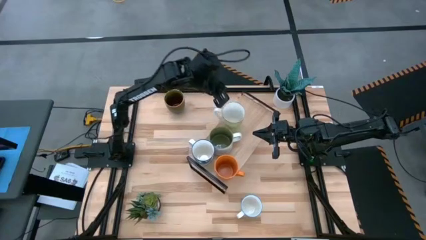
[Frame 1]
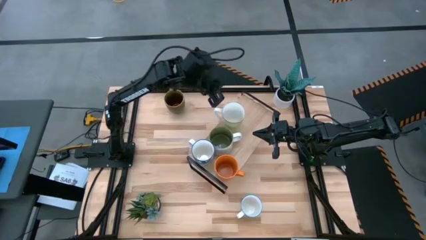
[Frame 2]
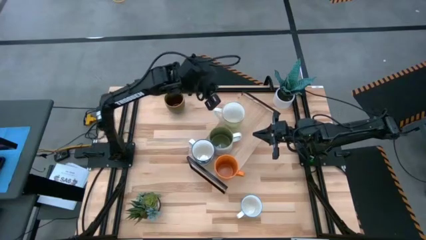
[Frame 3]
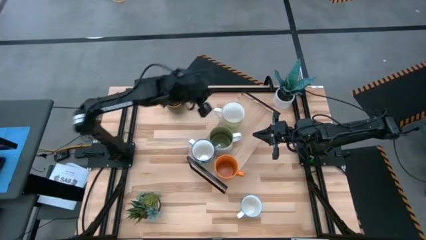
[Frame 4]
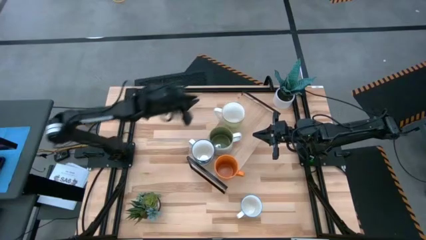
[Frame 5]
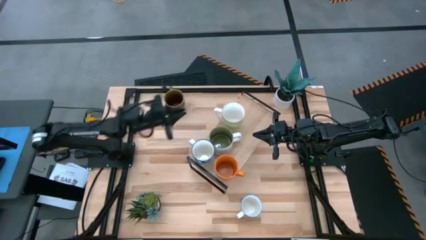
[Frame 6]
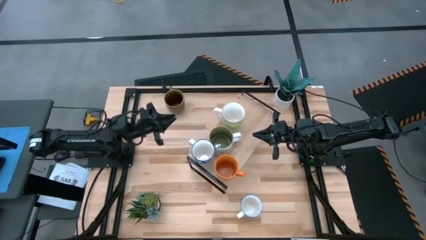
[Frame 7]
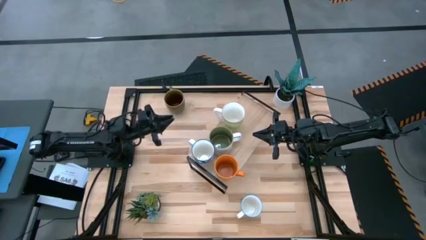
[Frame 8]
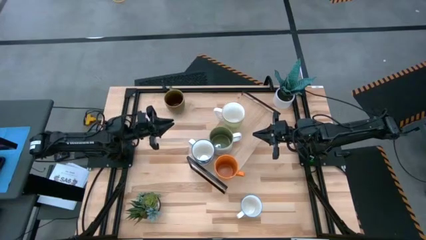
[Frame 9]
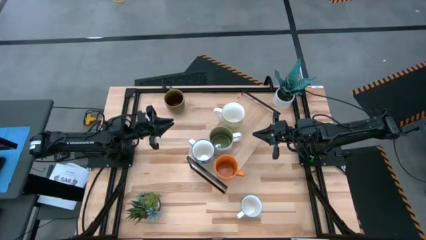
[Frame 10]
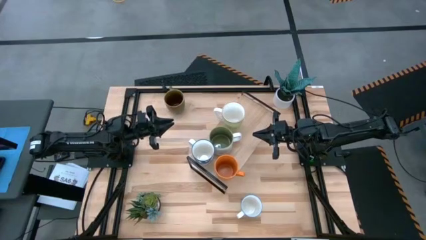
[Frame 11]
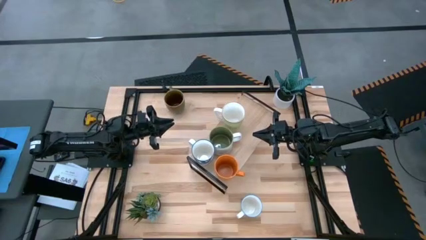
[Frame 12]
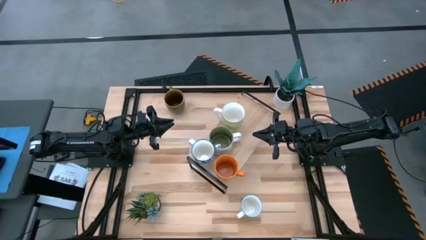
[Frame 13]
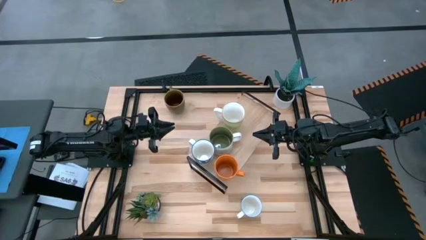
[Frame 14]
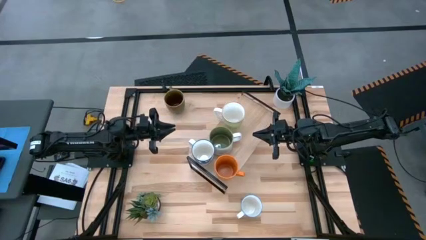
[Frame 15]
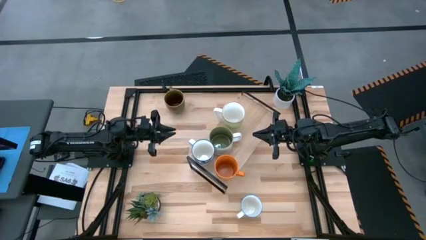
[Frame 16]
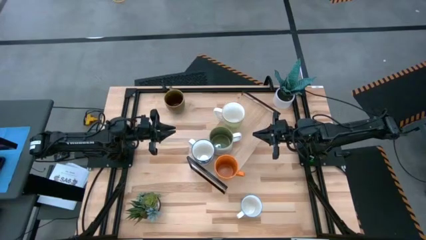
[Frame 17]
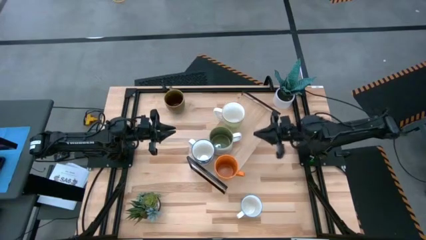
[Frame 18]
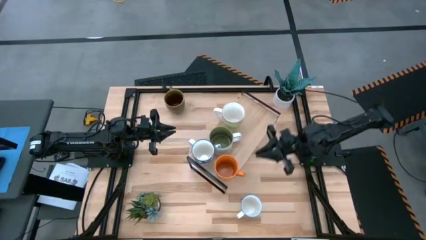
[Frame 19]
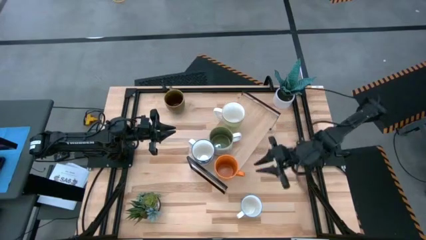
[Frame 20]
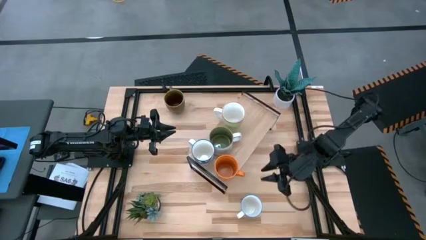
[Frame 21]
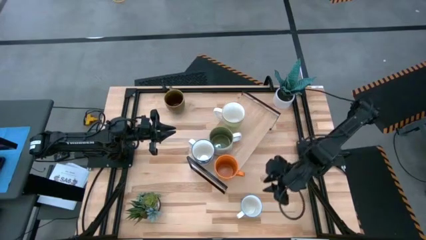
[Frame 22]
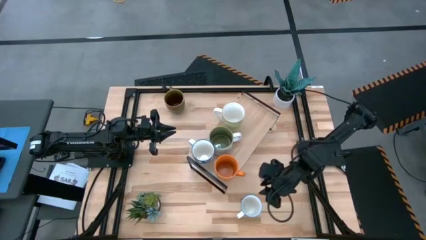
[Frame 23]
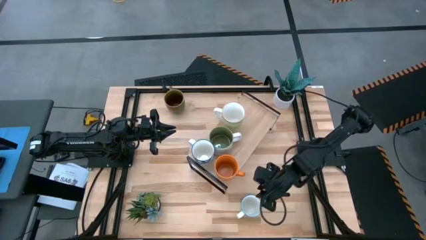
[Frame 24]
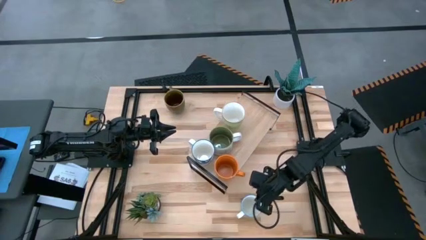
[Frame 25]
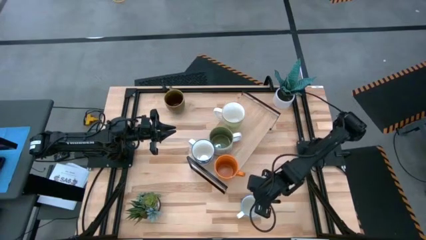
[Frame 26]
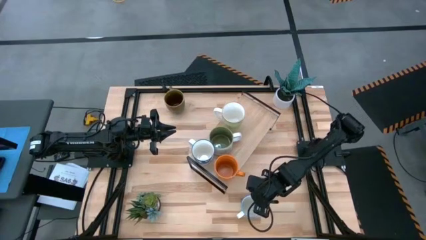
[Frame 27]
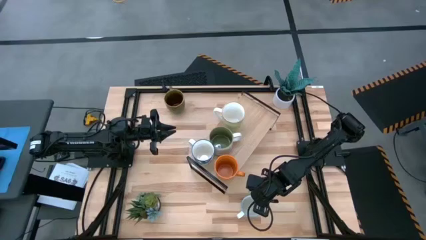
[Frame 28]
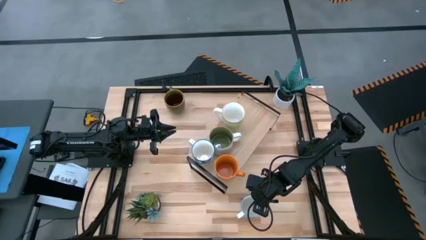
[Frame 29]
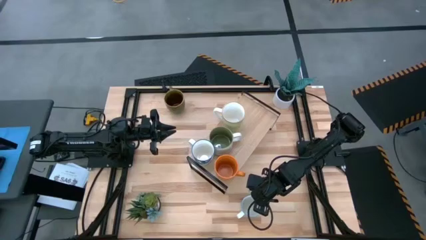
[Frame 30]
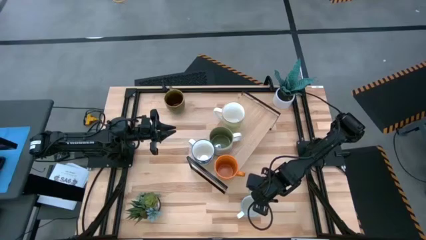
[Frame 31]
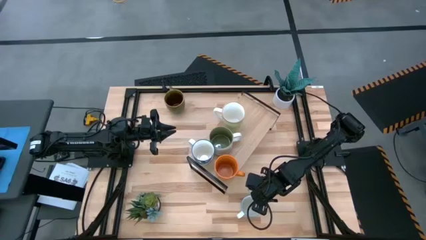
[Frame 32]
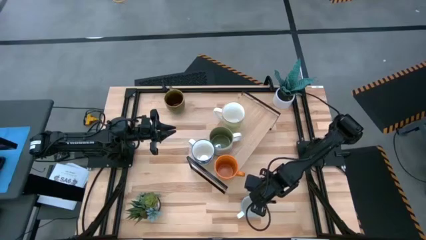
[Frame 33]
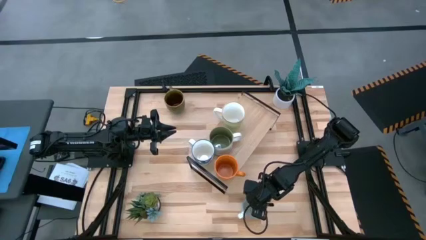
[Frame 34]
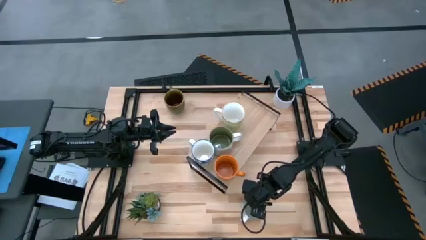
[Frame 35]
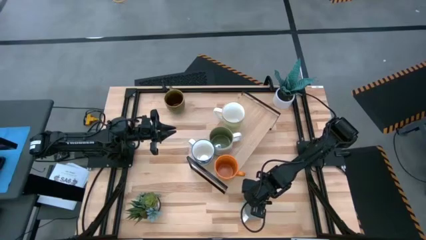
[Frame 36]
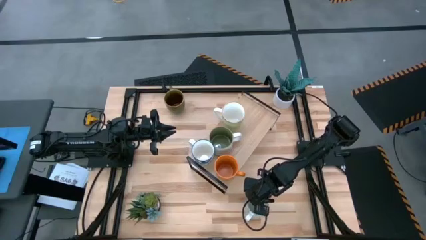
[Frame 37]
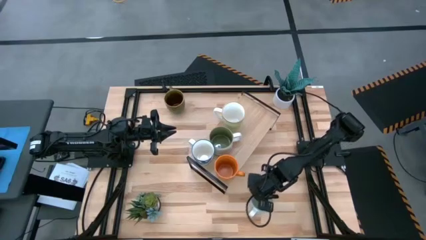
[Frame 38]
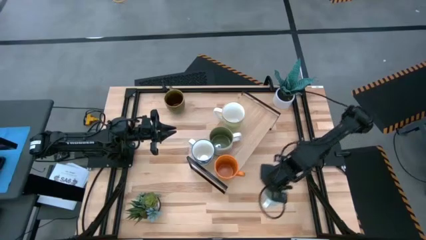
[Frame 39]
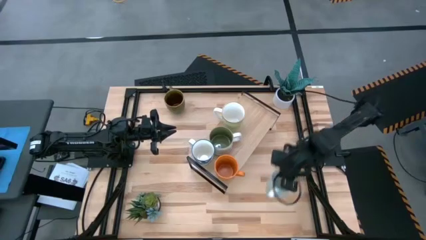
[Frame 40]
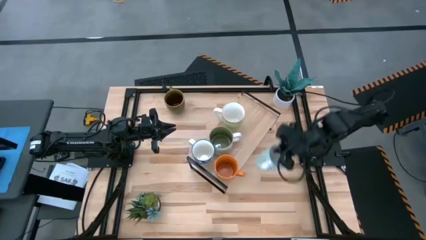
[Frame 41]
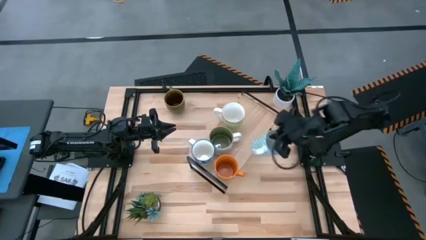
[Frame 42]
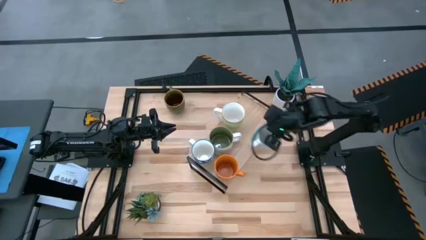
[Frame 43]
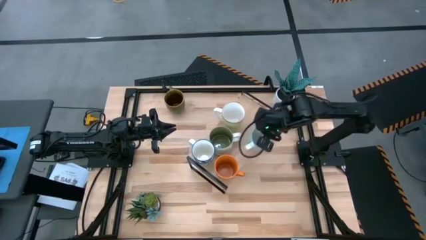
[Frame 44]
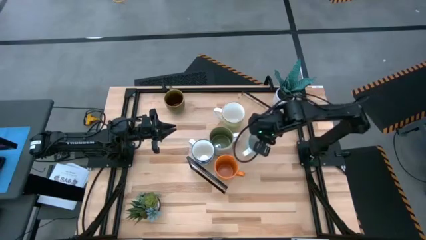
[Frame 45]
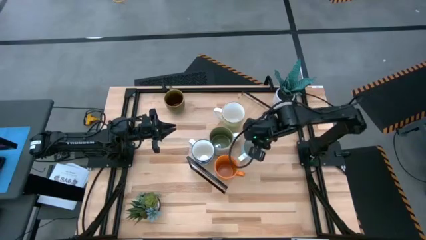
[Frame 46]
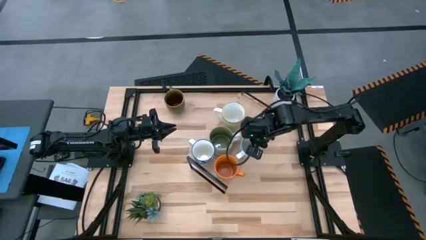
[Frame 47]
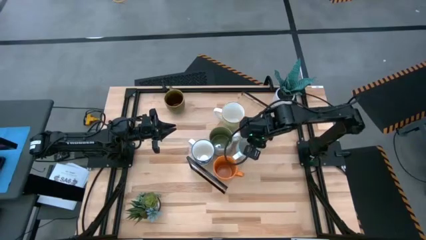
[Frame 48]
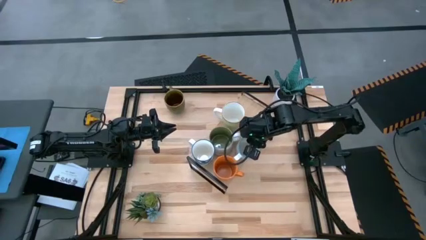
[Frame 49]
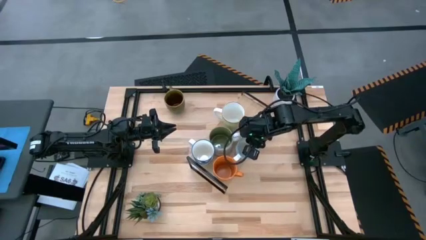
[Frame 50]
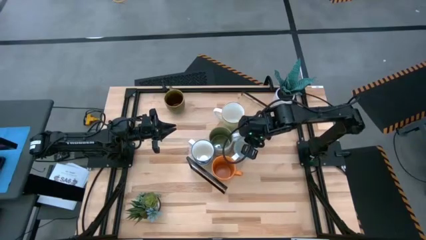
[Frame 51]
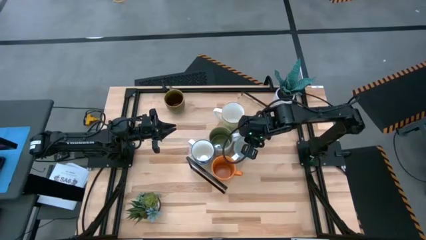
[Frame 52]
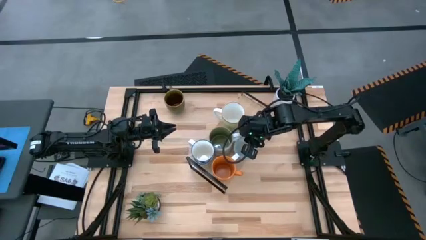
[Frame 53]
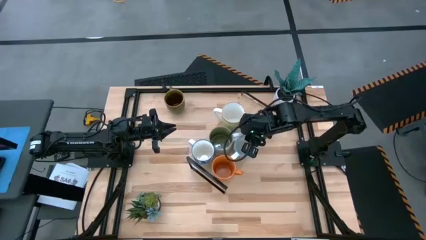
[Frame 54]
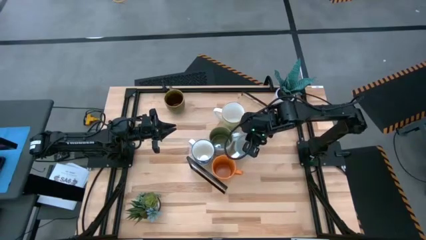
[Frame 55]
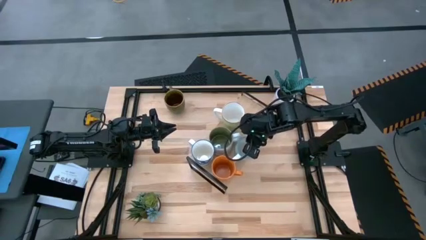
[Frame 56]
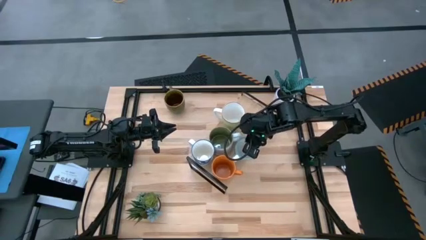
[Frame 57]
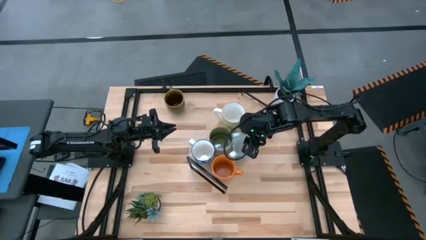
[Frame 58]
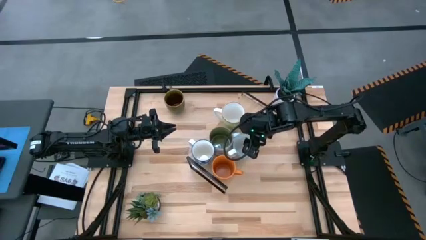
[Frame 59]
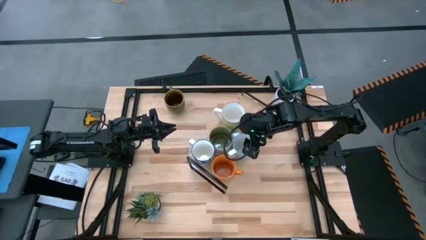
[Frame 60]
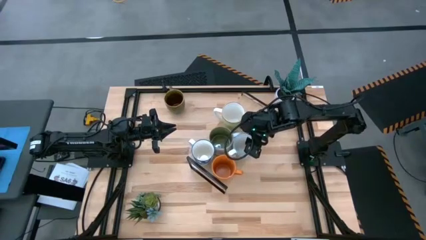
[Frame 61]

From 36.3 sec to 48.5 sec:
Task: Place coffee mugs
Put the light green patterned mug on the shelf
